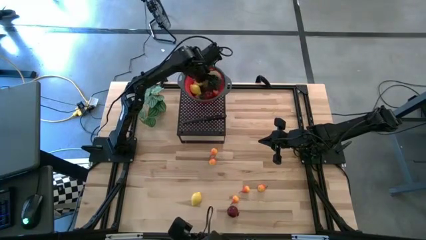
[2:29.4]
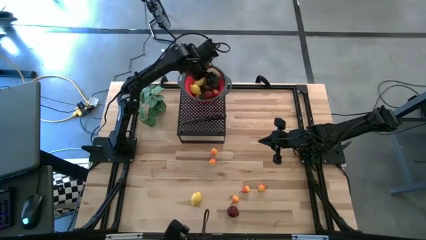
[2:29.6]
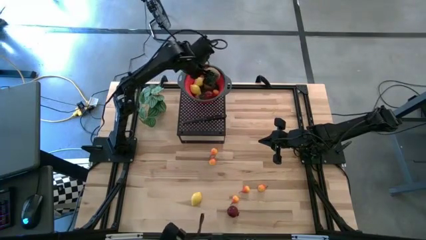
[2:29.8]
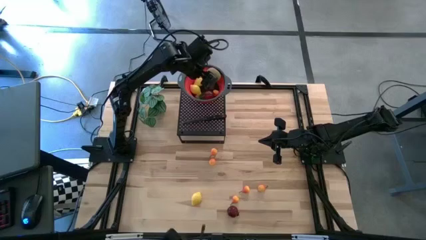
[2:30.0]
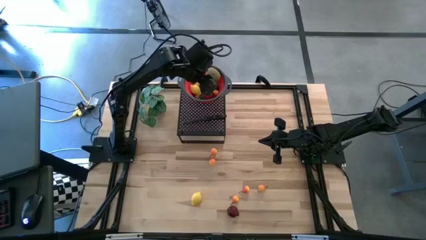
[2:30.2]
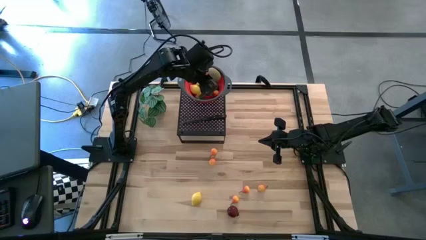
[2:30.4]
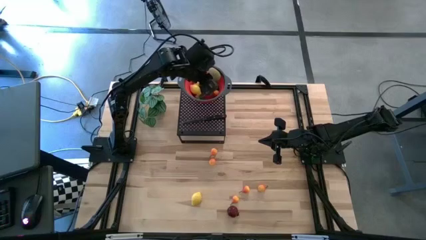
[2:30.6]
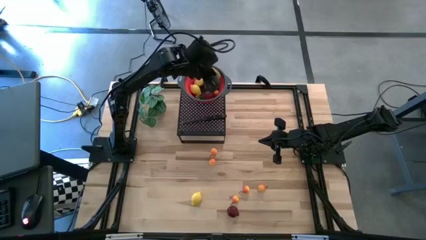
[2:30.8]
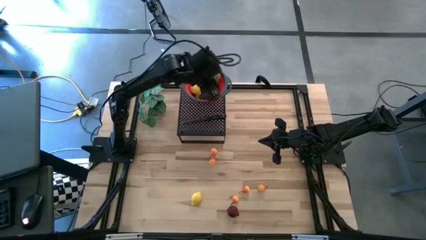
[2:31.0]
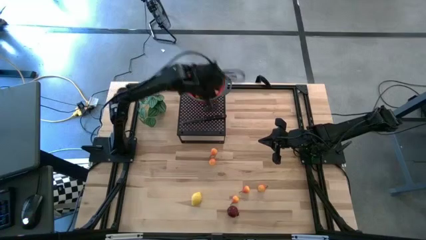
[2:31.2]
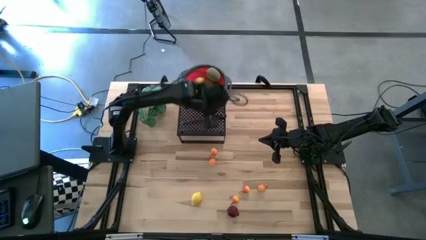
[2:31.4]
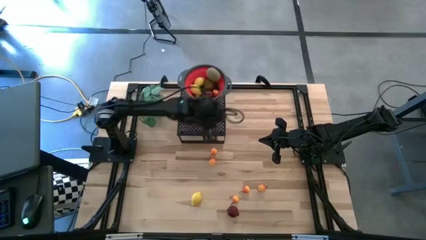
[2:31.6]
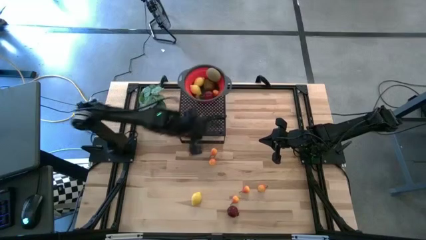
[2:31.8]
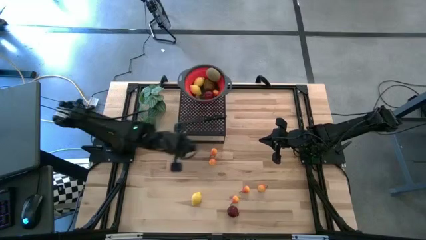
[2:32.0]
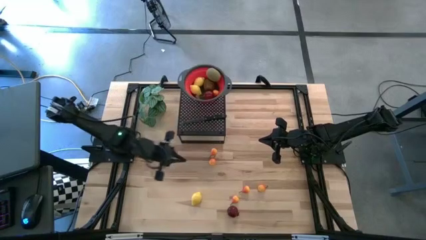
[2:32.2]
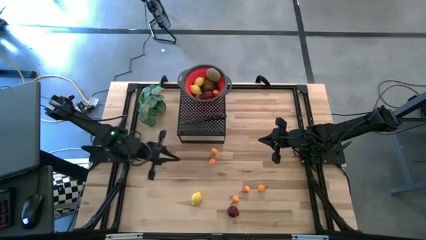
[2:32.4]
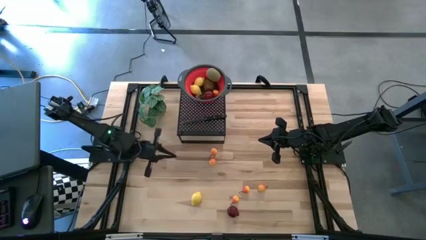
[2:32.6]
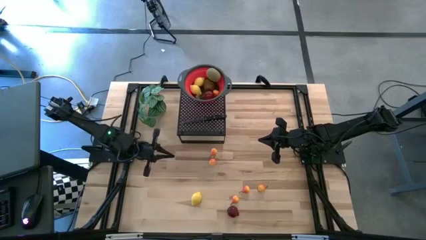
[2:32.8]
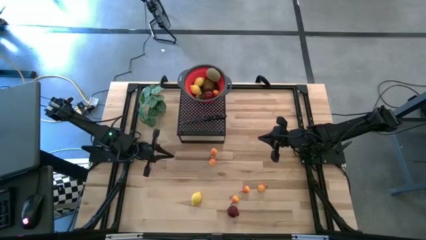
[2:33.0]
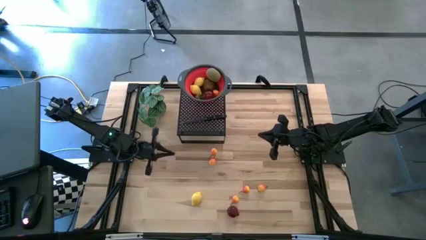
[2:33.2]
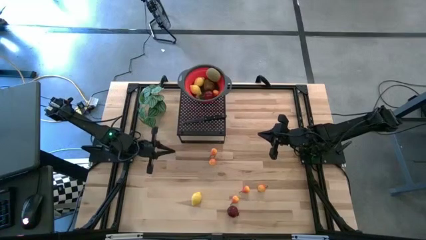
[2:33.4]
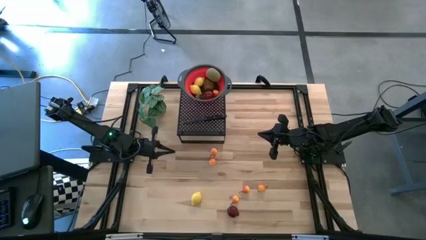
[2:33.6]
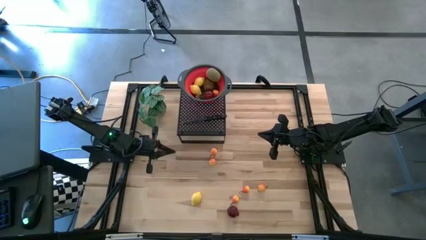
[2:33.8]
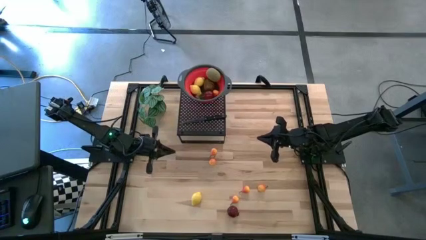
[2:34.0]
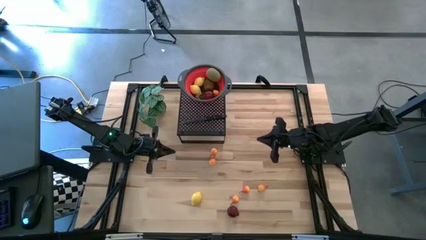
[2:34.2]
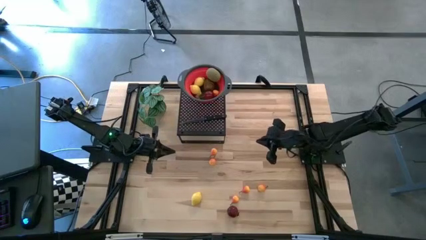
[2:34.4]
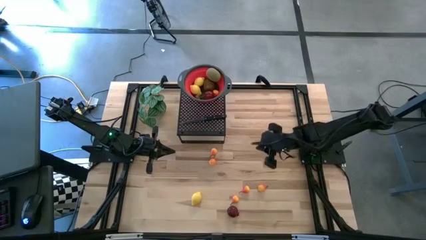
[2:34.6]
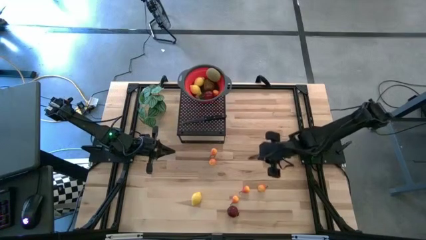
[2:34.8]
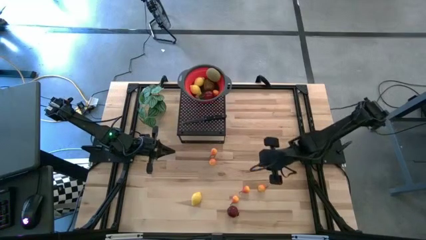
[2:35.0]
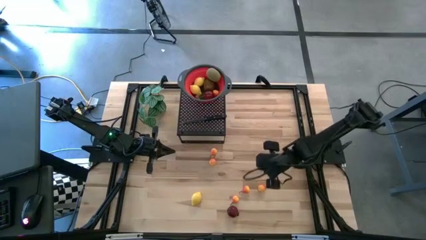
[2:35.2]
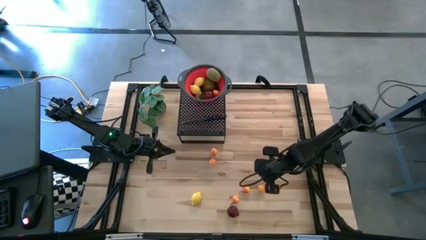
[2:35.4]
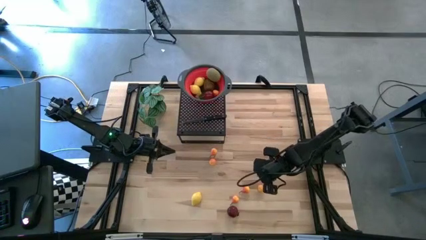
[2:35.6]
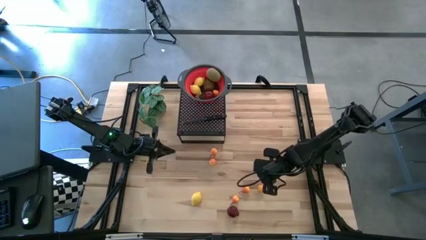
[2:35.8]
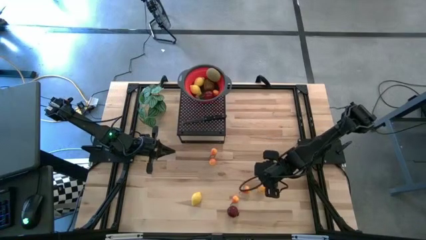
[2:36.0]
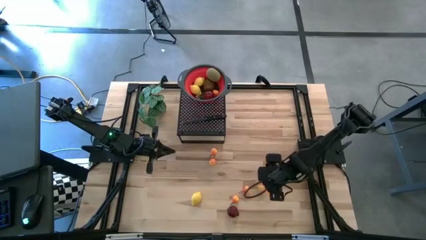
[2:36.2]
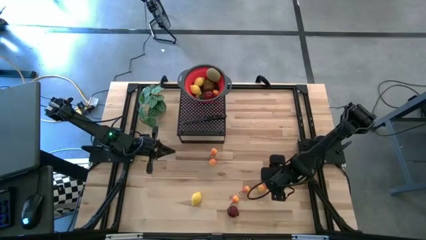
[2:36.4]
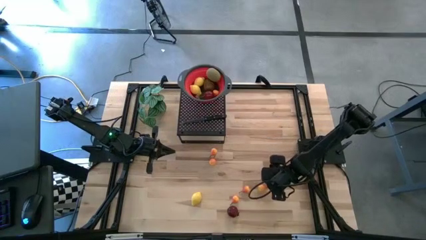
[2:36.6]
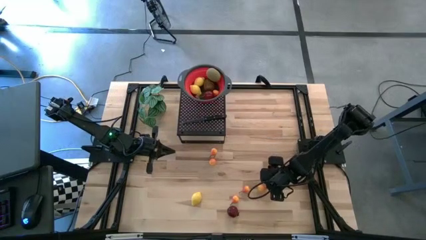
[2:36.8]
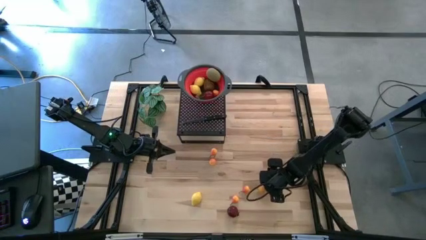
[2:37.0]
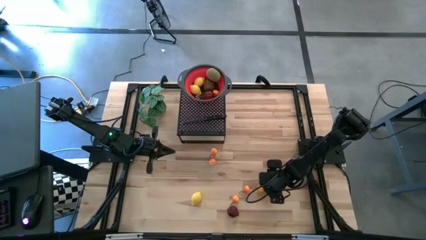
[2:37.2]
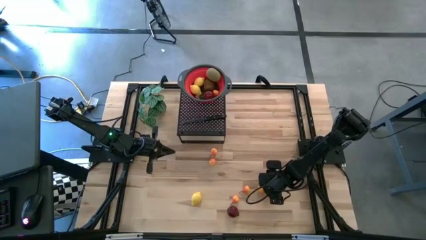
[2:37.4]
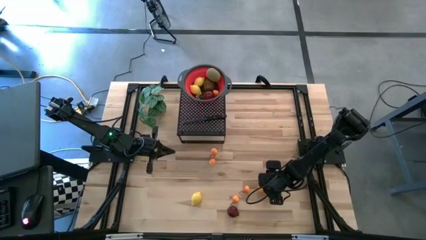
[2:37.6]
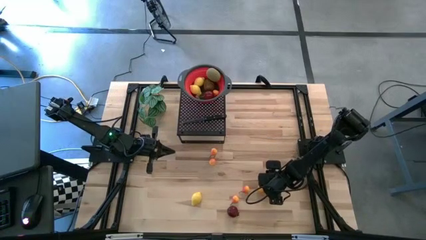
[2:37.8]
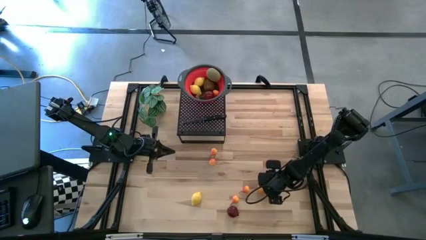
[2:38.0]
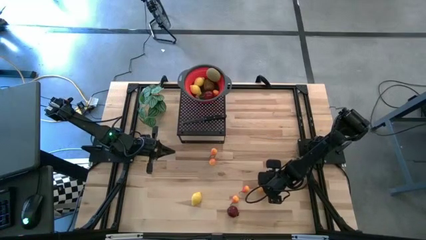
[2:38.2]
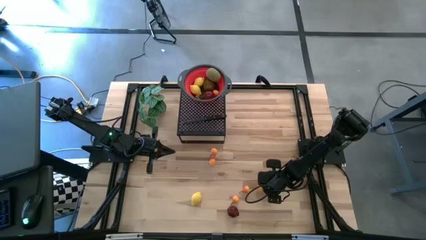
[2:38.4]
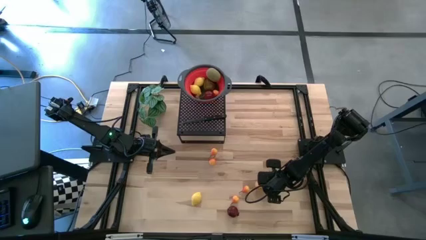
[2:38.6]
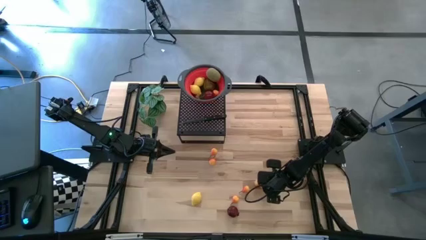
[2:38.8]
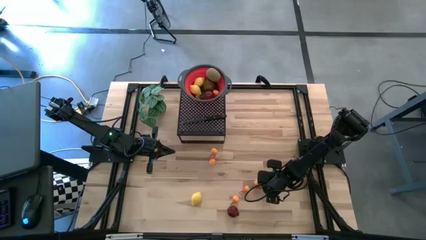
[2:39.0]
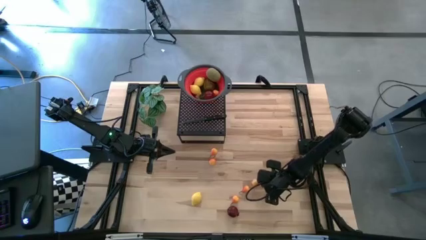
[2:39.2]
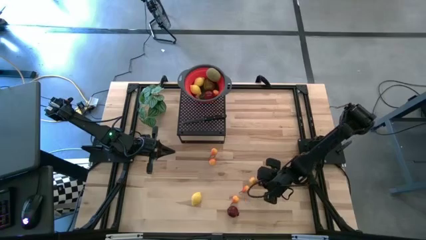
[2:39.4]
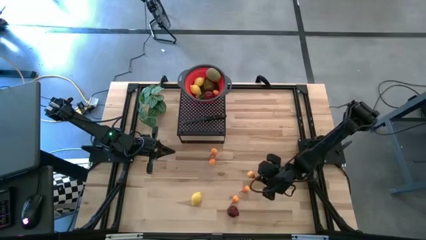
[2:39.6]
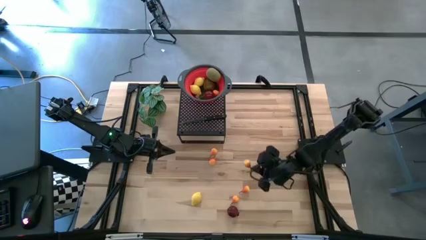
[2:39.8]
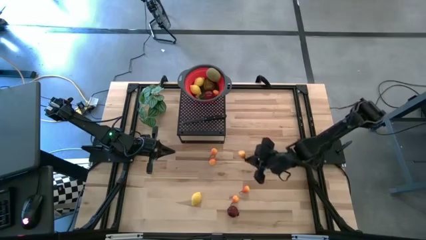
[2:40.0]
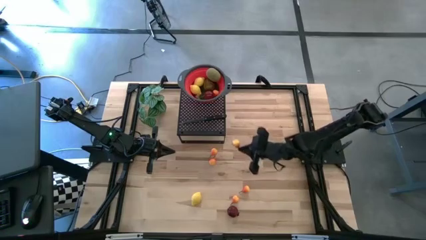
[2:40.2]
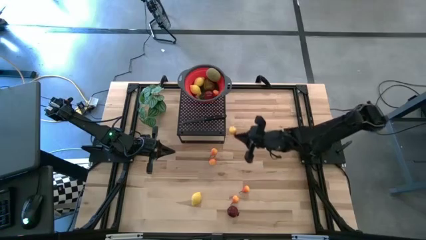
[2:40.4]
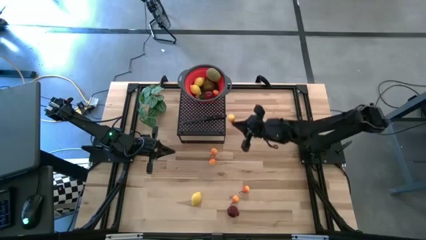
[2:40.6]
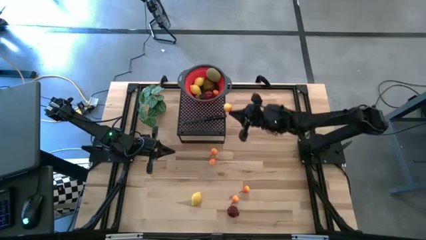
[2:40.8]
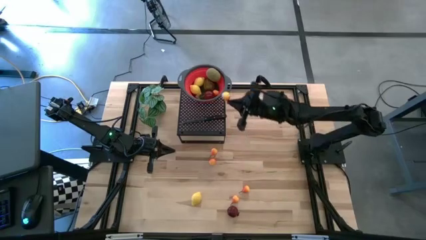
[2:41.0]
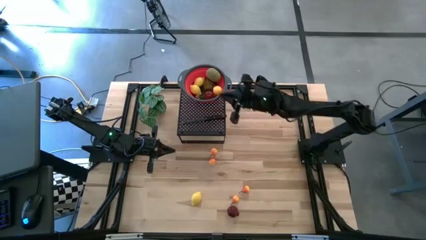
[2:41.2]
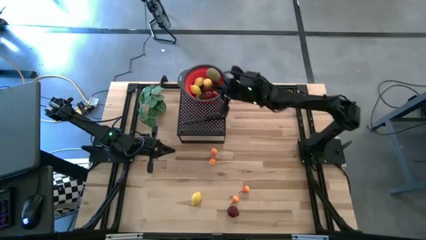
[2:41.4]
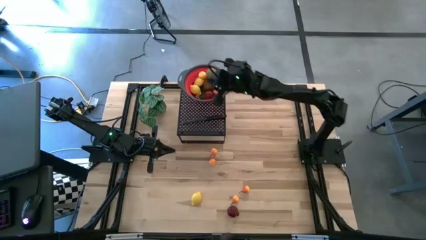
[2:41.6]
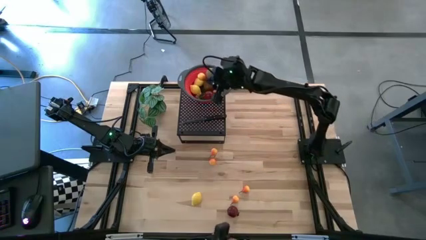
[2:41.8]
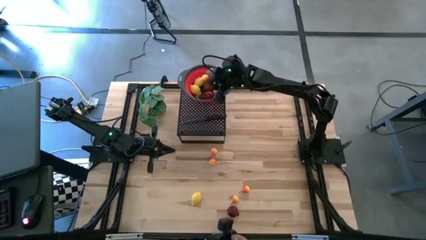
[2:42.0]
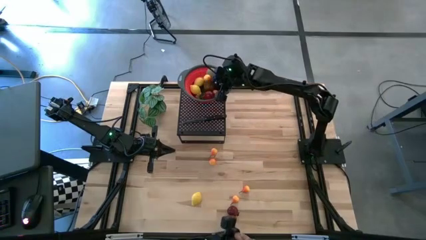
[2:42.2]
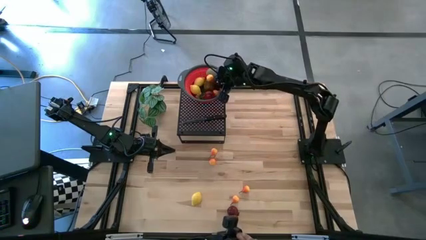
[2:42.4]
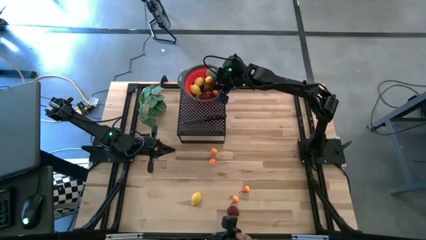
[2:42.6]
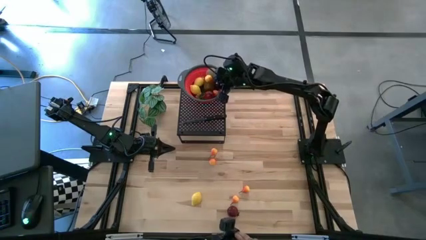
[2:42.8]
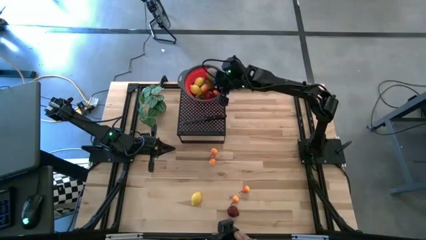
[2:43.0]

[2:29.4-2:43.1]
Task: Pick & Place Fruit
Put the pear into the red strainer bowl

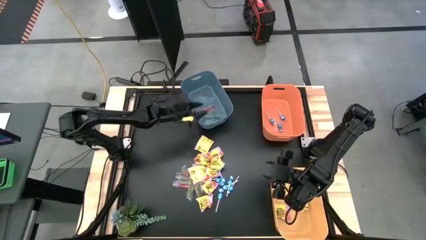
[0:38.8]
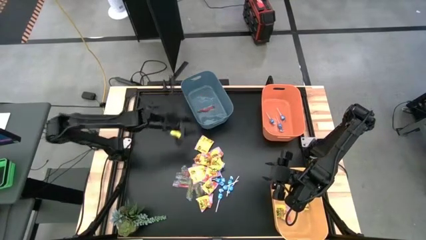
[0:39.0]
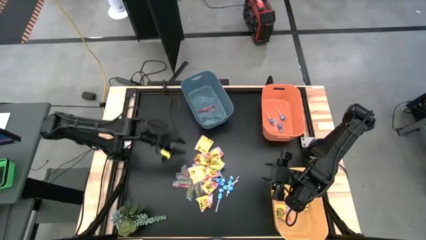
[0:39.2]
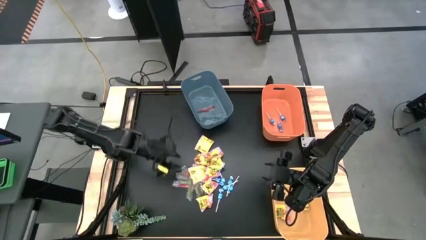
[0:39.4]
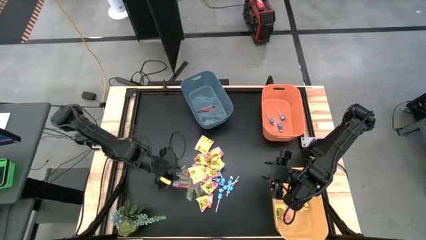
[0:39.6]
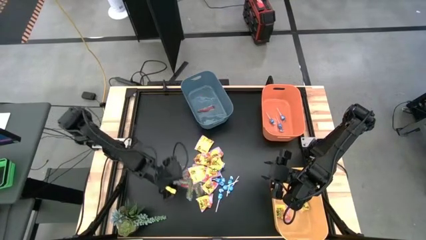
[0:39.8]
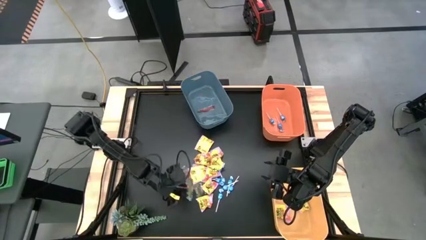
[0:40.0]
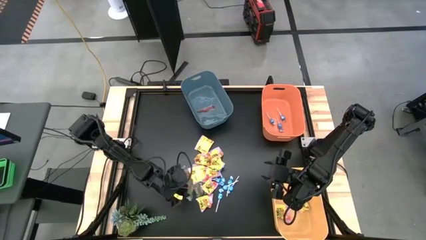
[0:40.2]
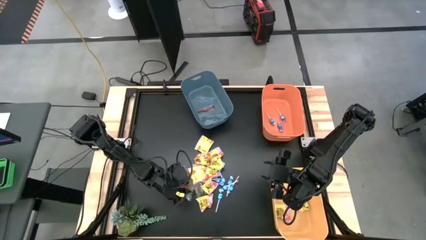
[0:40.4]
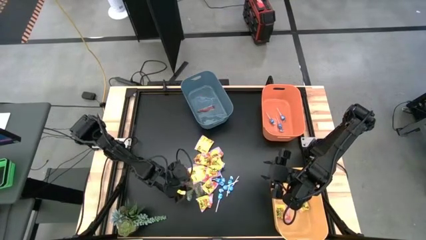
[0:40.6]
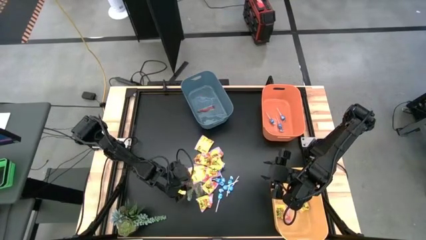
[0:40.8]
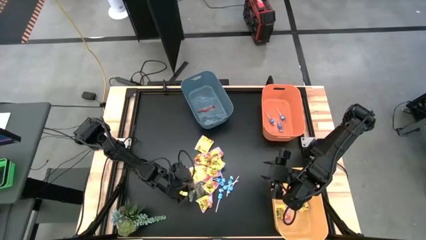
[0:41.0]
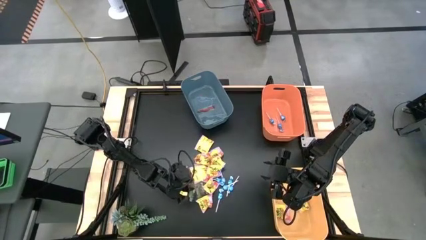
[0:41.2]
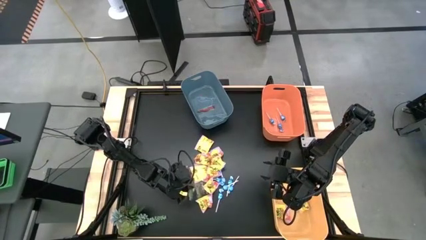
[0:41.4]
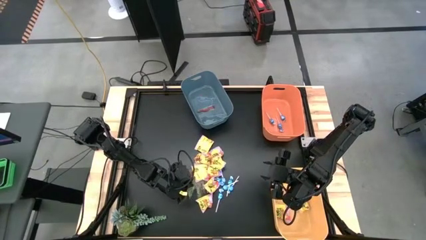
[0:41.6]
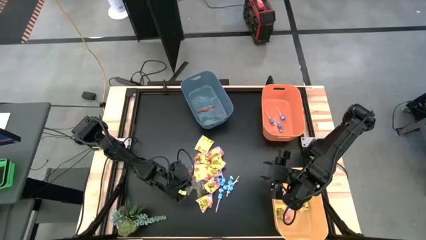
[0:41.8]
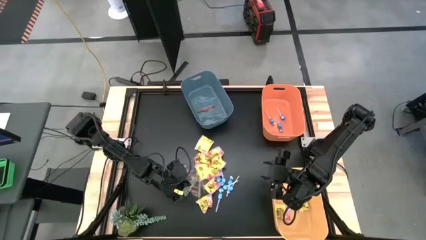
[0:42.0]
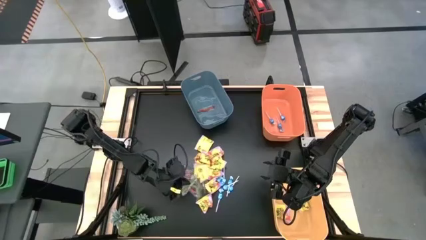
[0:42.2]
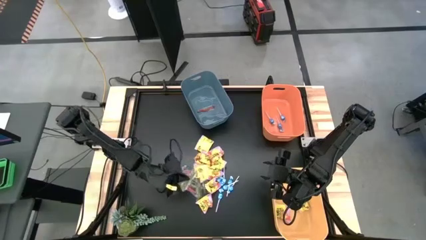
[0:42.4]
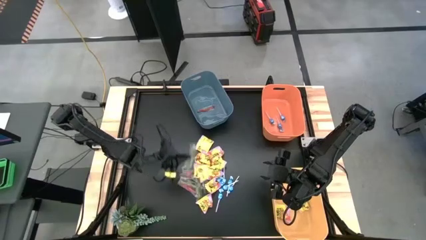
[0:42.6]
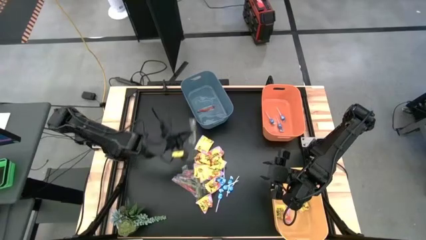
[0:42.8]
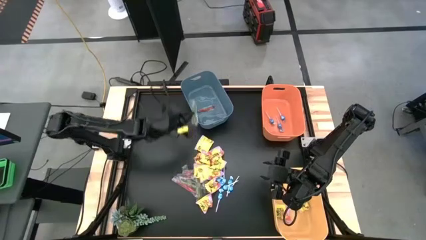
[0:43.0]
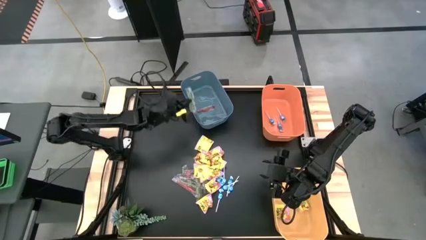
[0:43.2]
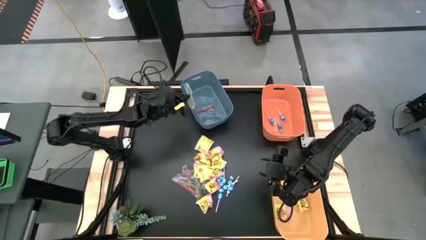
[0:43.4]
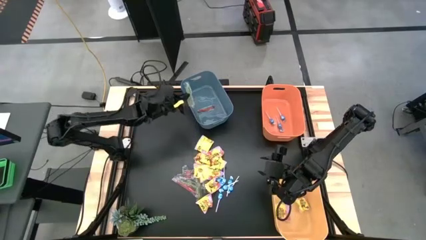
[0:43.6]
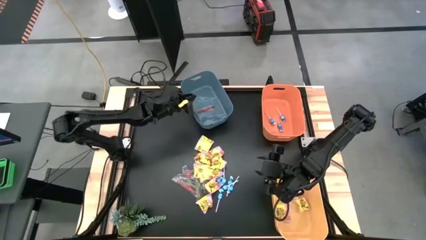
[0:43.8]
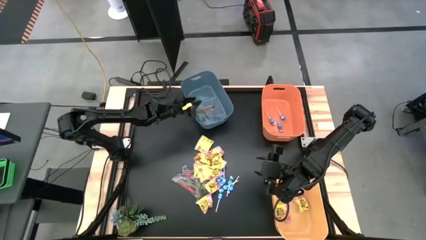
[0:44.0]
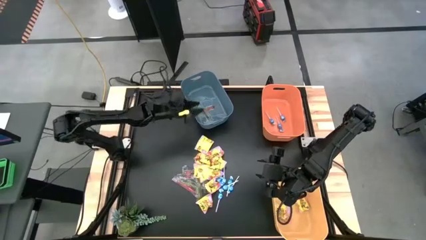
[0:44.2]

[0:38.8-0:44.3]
Task: Sort candy
Put the transparent candy into the blue bin
